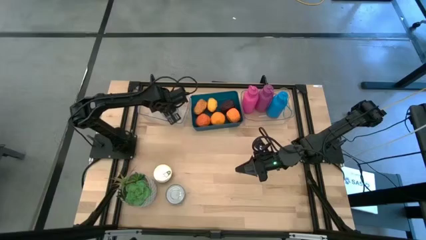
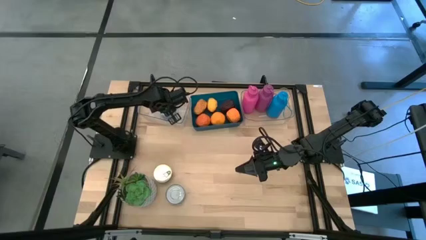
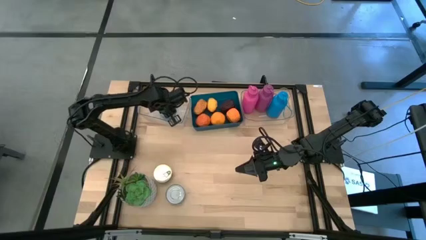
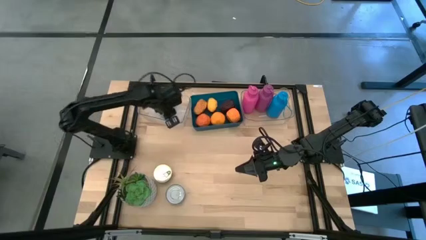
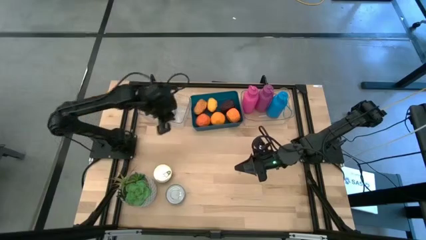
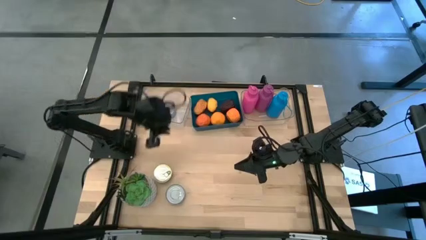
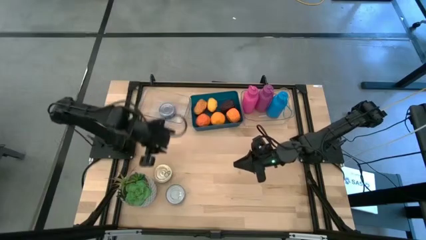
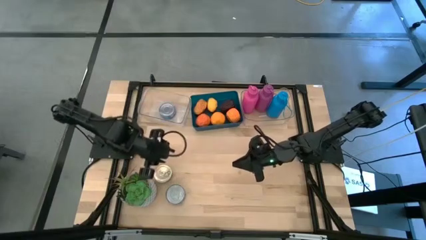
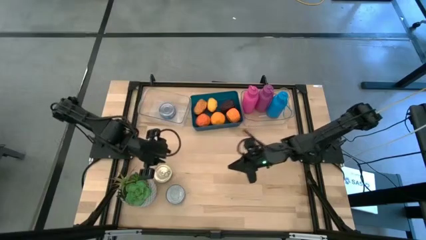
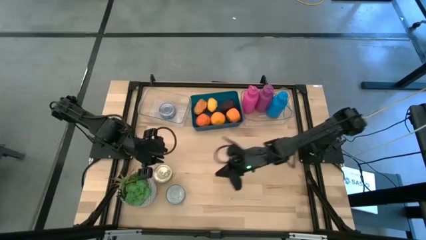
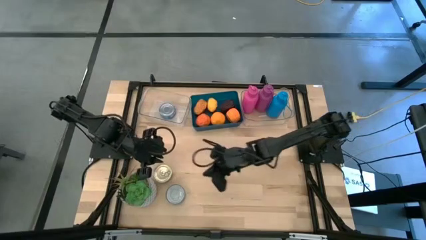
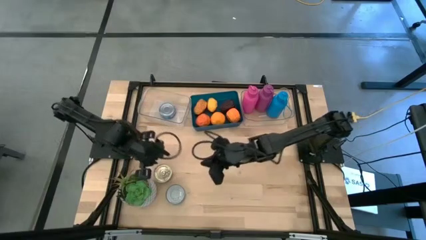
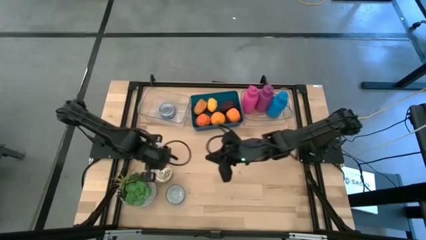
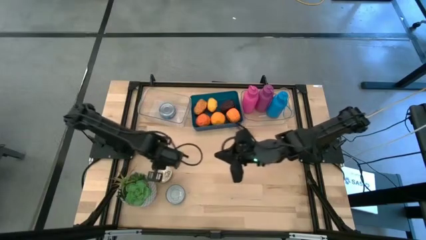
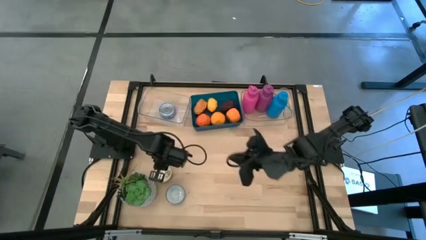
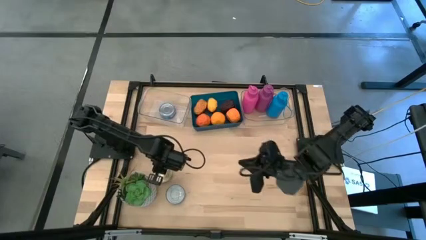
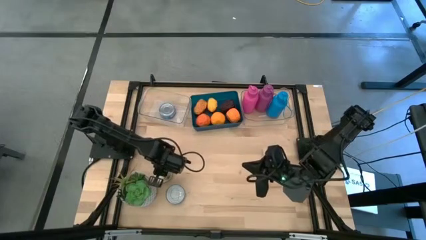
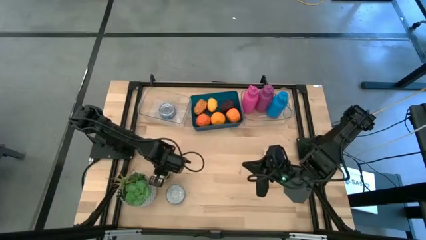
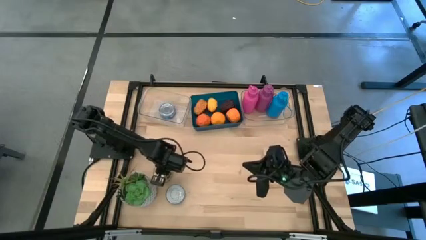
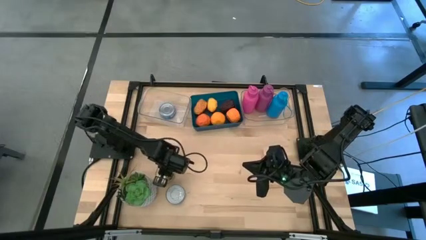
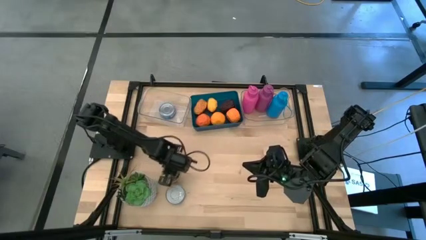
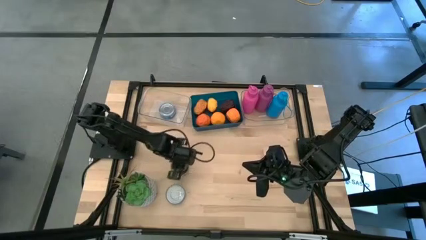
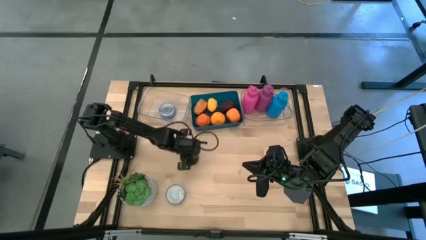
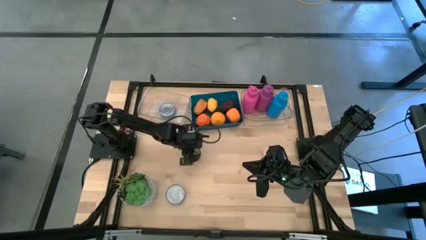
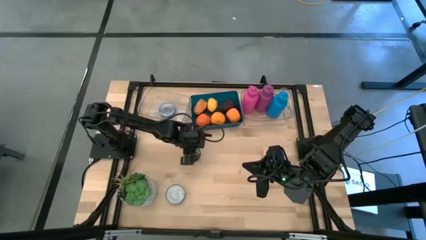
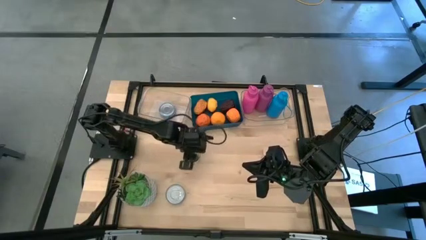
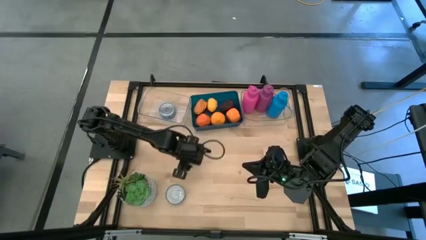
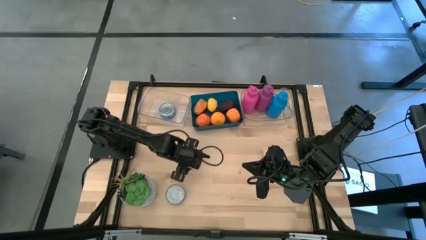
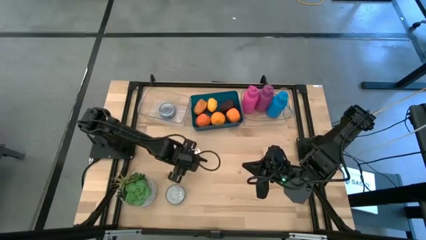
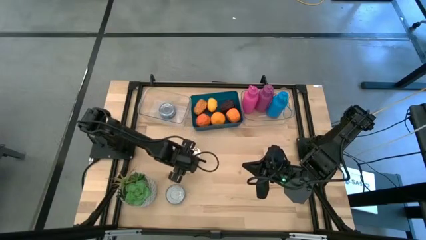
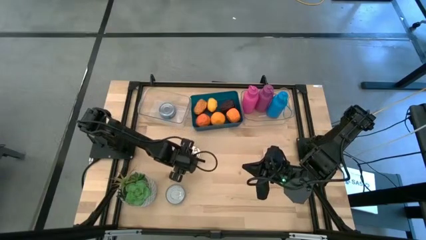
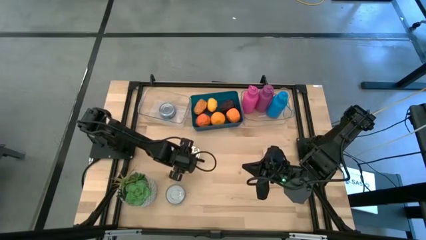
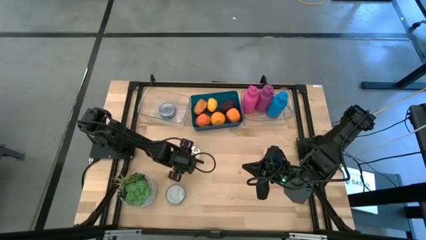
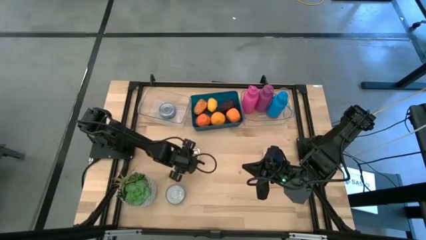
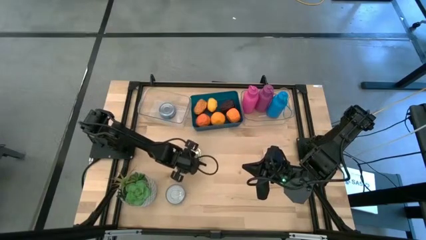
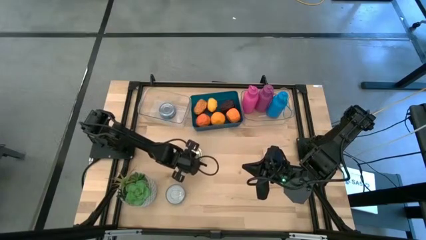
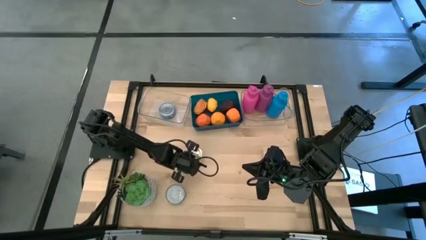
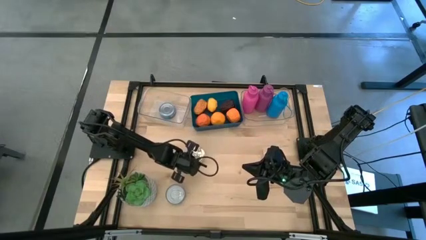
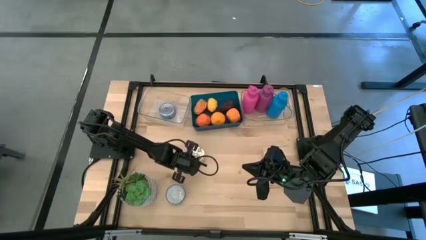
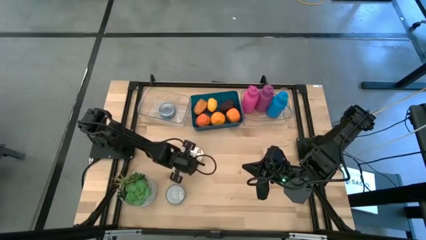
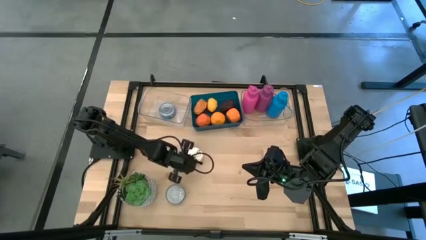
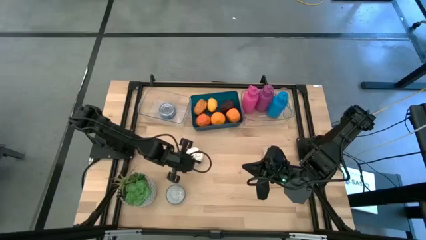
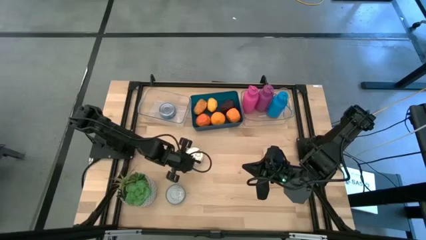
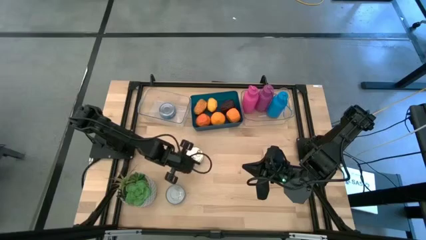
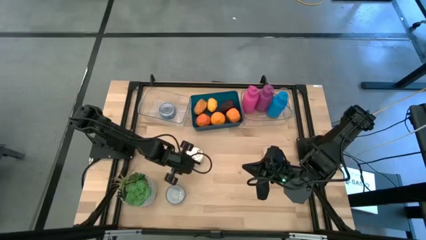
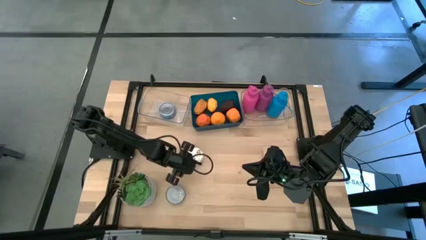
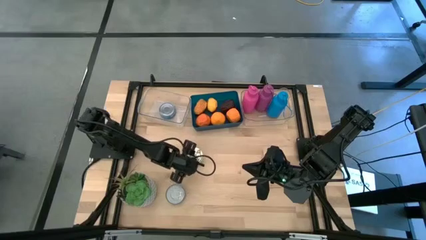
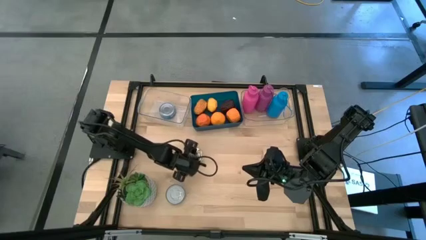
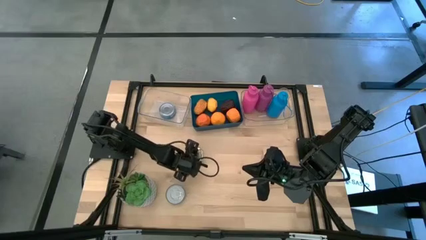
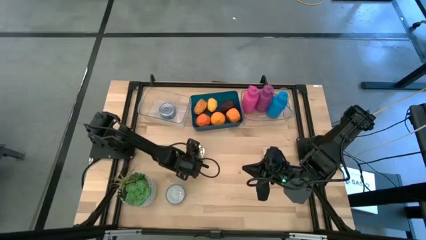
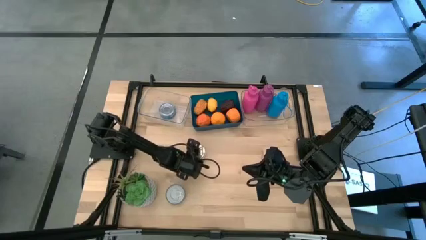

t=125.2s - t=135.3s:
Task: Pick & Place Food Item
Put the blue pink tuna can into the left transparent bin
